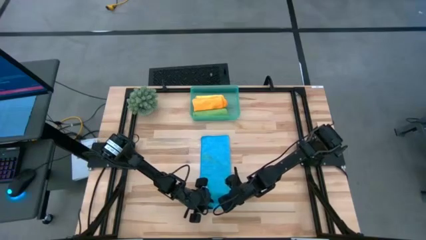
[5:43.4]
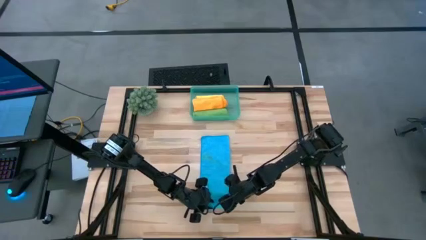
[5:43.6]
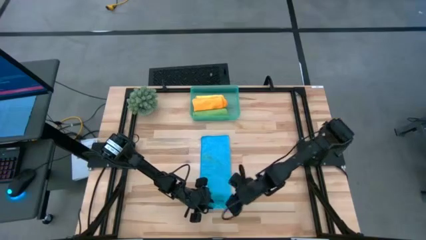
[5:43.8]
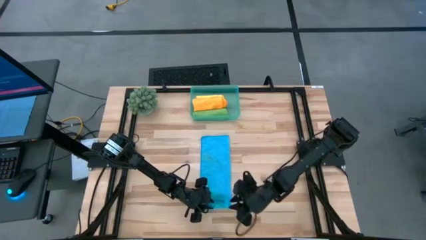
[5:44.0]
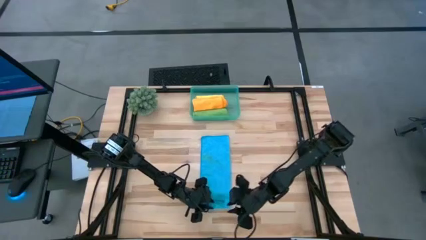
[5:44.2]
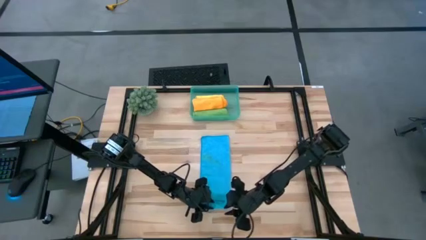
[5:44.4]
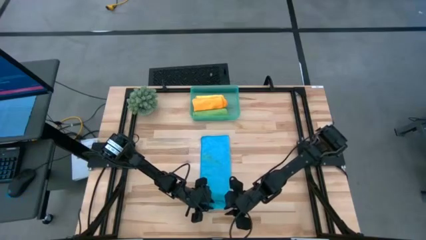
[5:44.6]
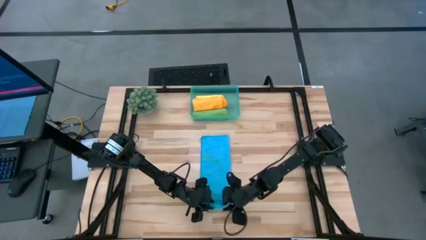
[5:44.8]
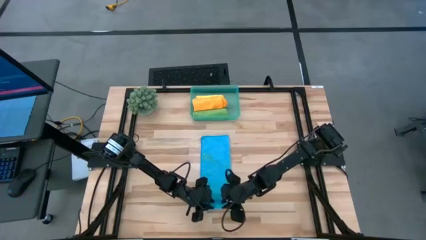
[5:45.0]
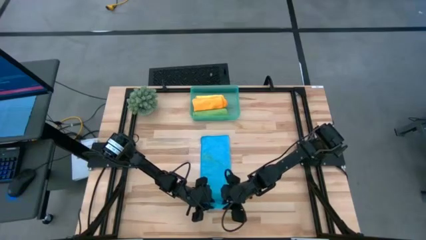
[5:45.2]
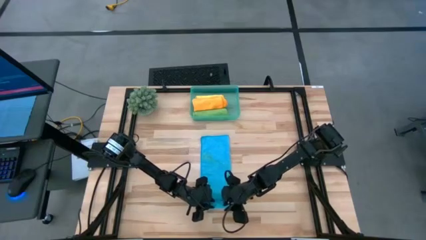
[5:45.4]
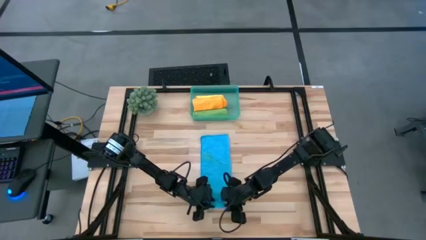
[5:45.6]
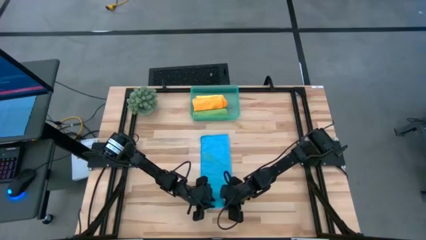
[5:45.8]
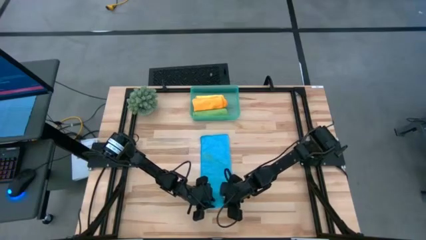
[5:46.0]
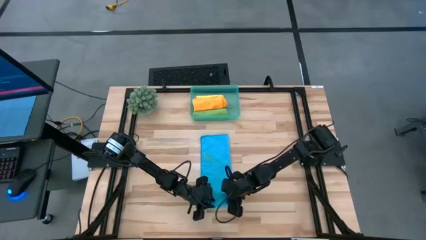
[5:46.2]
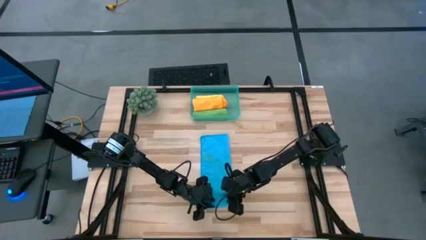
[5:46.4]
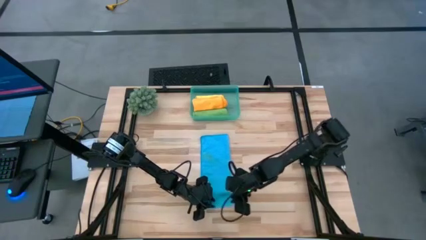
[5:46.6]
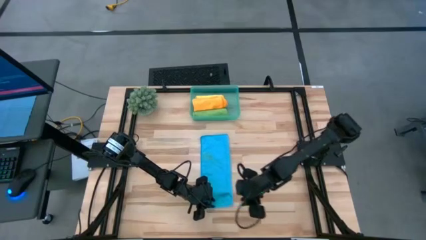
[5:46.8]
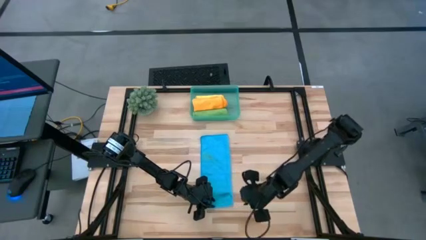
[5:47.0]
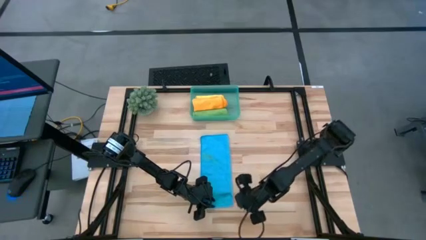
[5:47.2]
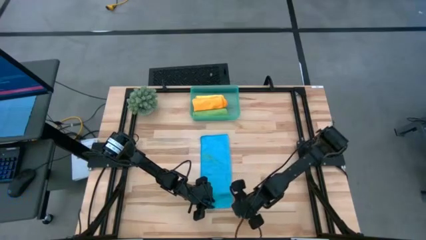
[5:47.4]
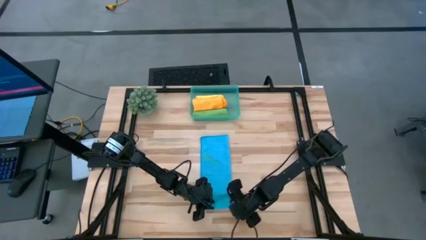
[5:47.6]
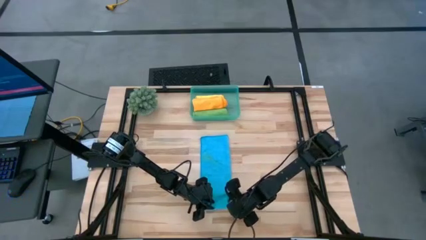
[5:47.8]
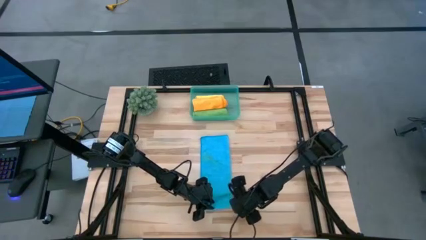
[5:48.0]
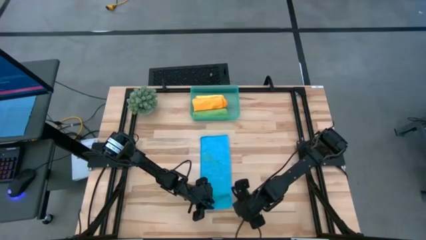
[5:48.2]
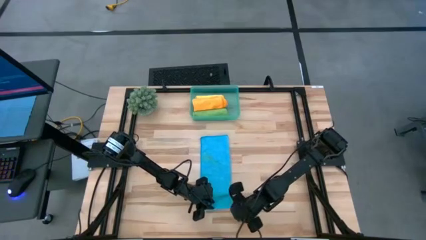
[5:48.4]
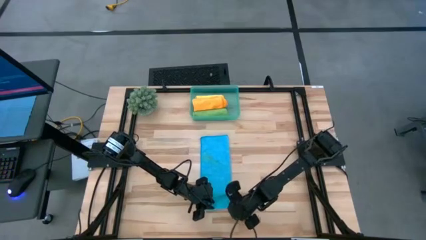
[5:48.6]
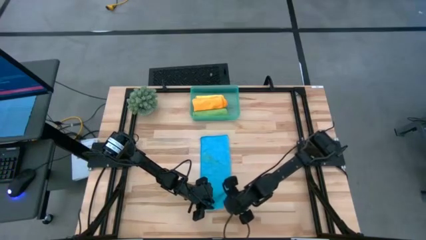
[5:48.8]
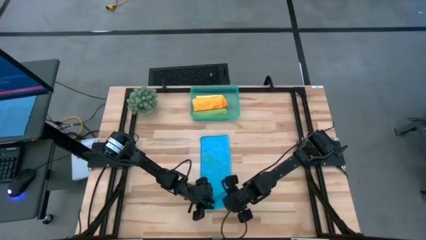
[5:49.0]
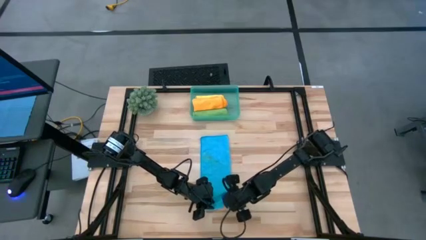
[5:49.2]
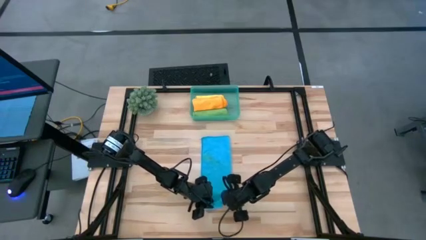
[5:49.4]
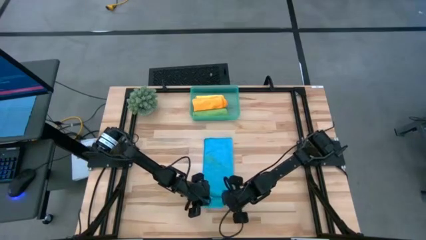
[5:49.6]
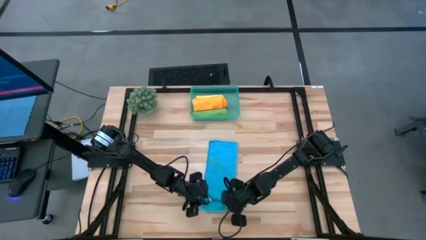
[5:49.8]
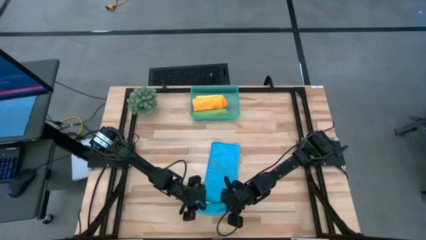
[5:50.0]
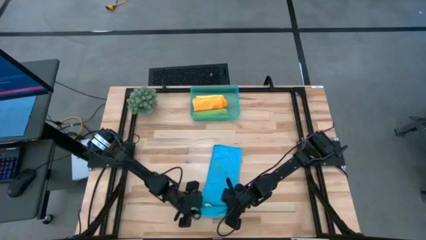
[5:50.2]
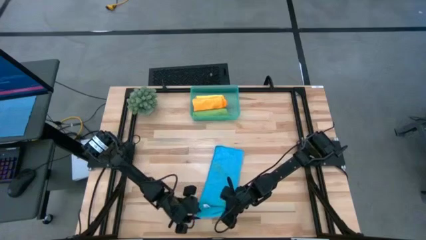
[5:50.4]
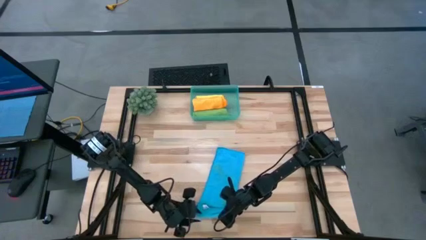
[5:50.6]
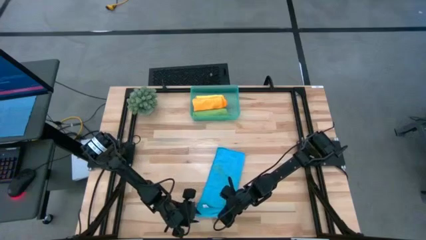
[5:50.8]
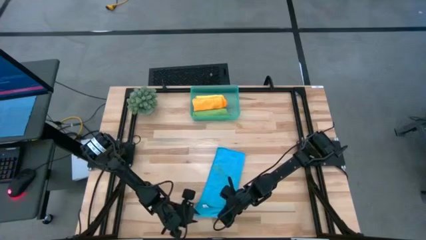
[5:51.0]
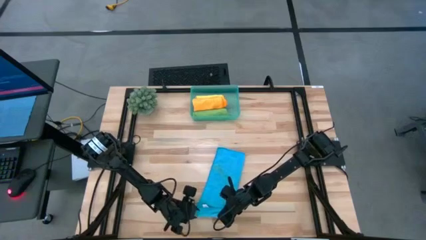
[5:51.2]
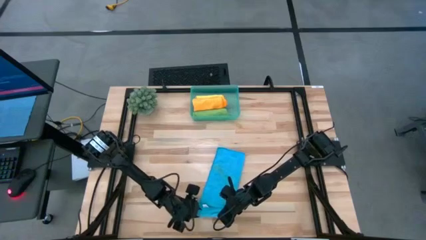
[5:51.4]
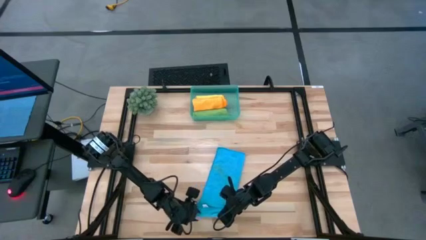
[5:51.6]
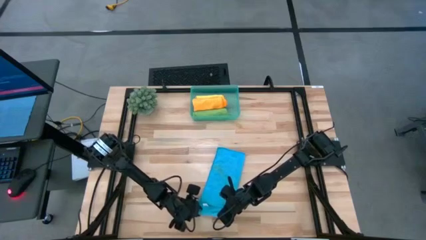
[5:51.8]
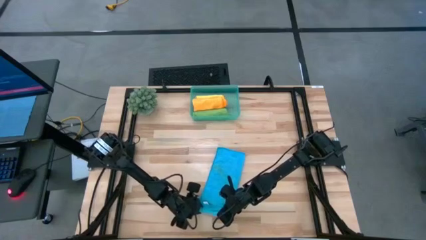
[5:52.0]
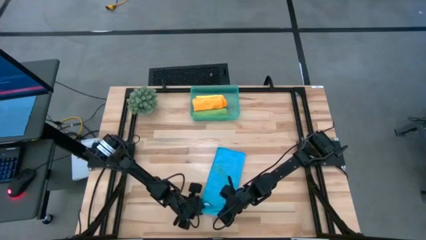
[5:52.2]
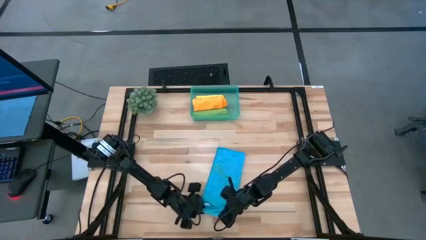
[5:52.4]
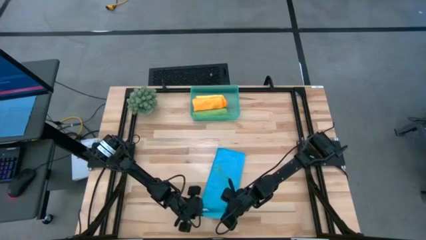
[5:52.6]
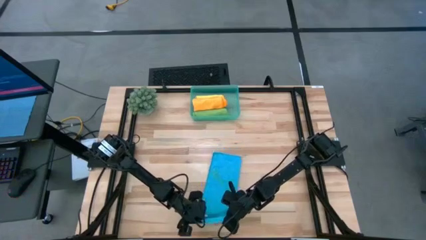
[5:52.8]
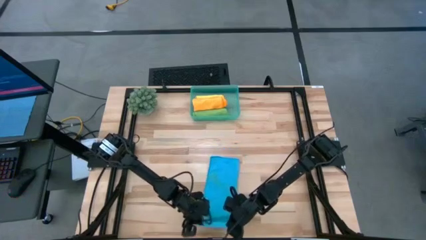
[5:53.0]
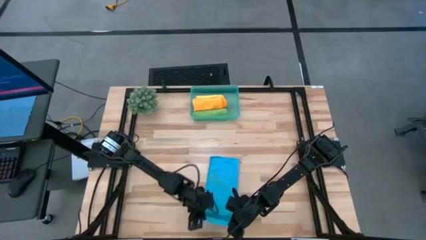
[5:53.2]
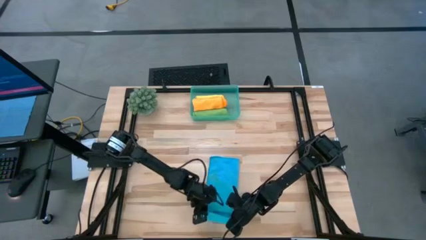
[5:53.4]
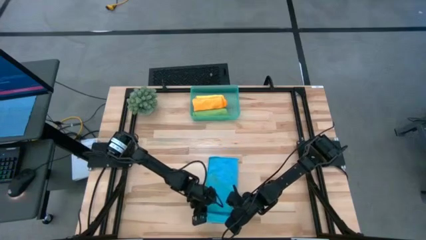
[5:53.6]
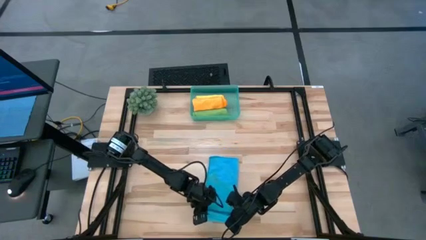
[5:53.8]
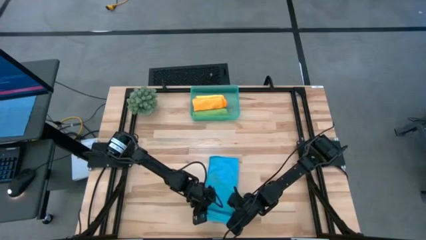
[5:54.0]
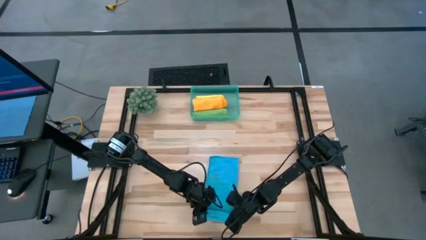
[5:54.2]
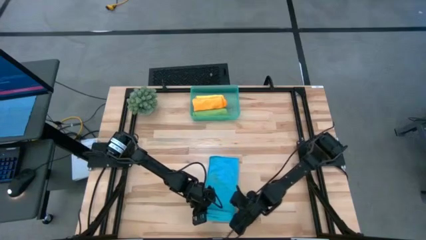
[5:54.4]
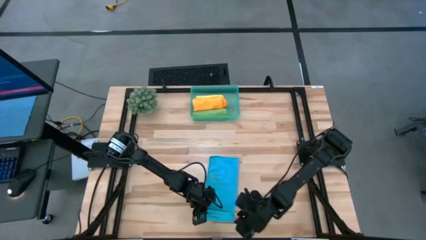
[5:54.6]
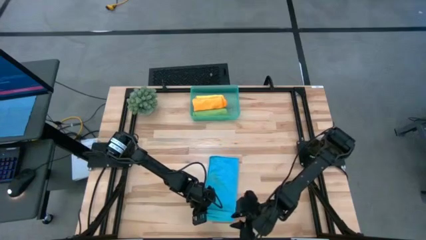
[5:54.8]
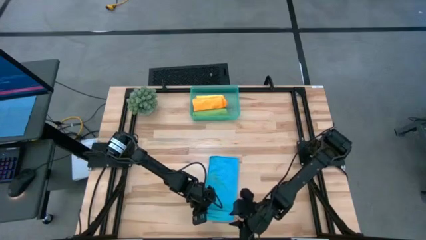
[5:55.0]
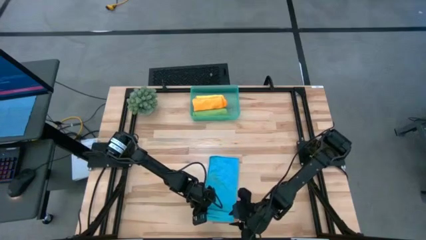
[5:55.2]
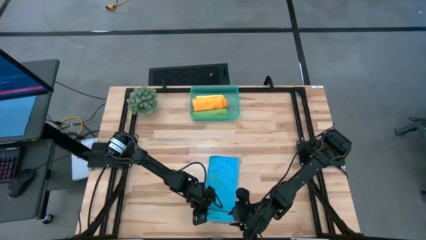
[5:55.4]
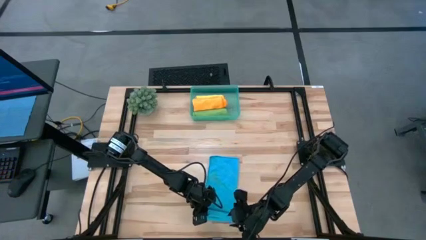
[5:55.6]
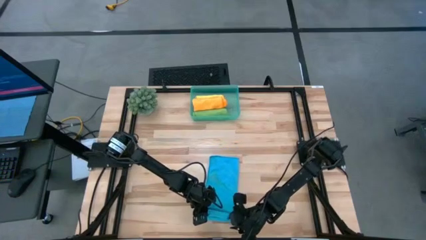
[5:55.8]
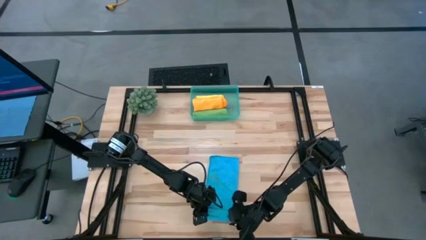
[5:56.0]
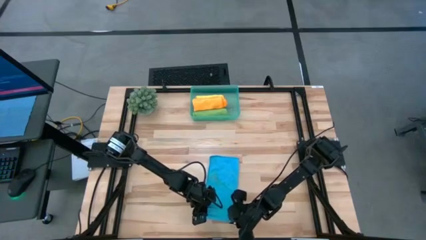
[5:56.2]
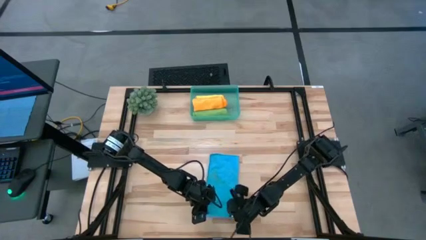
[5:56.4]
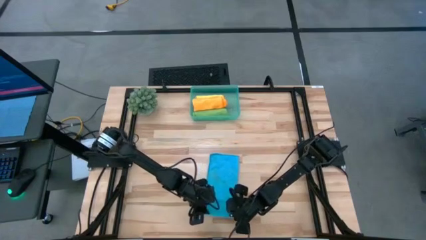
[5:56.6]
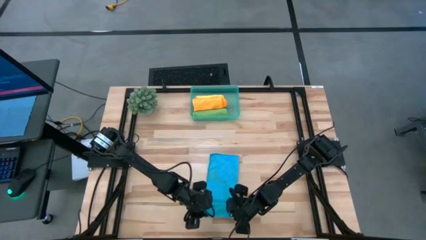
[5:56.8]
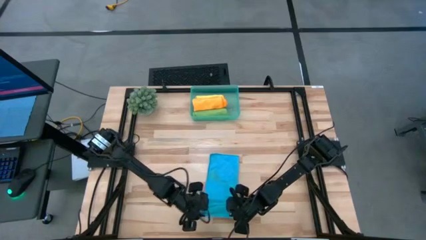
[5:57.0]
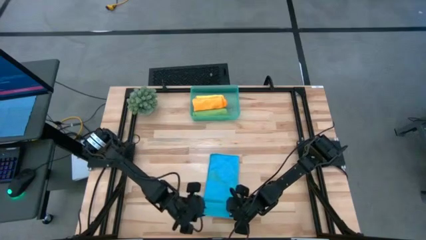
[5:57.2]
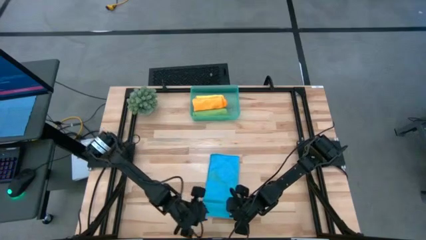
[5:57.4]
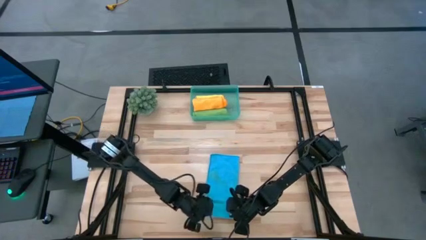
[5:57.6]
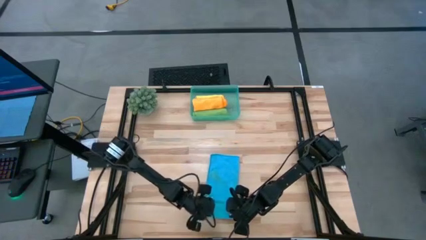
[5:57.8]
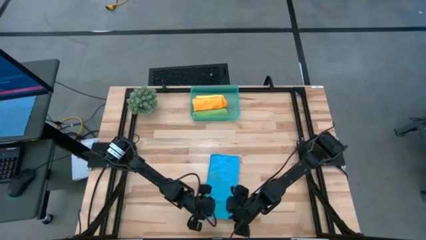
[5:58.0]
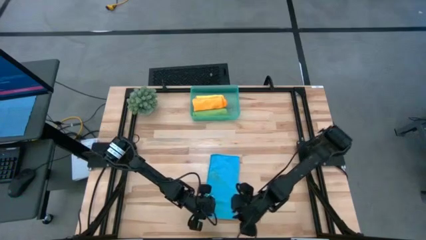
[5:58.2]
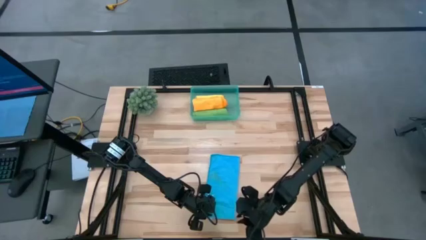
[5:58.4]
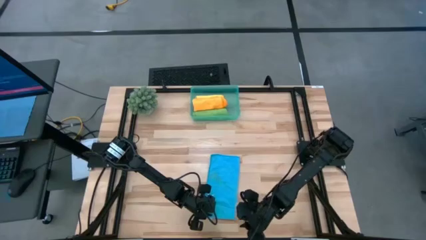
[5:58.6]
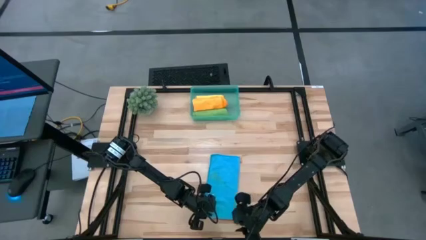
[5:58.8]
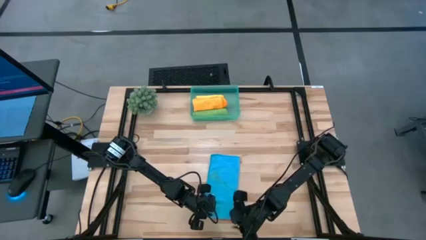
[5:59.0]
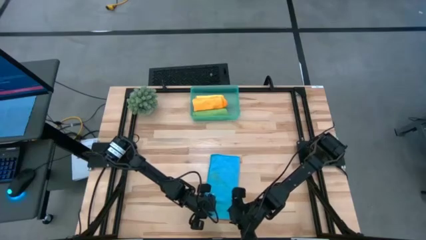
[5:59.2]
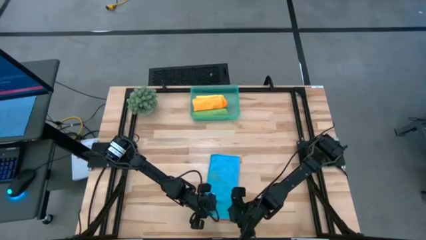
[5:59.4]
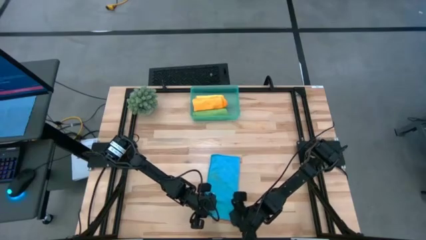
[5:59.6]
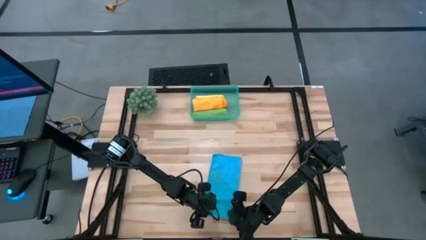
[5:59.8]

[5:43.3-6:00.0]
Task: Roll microfiber towels into tight, uniform cylinder then place into a basket
Roll the blue towel
